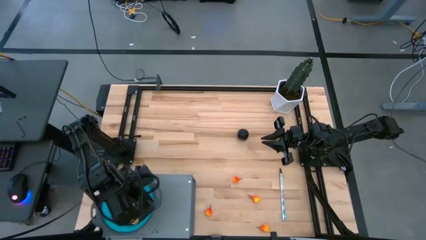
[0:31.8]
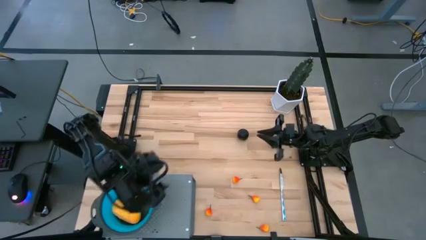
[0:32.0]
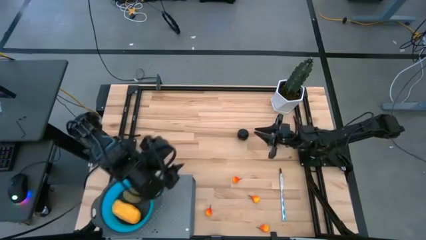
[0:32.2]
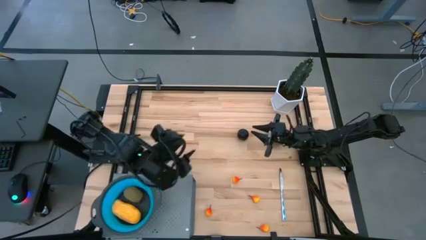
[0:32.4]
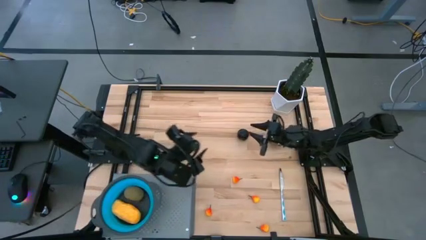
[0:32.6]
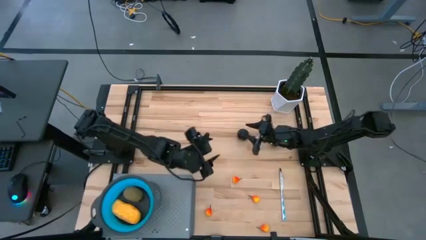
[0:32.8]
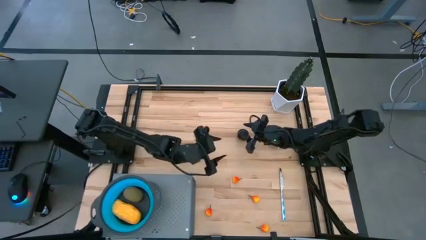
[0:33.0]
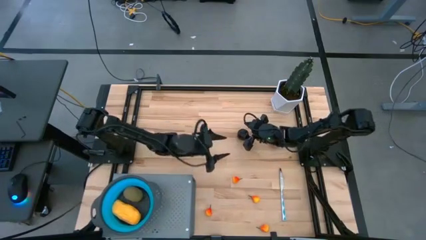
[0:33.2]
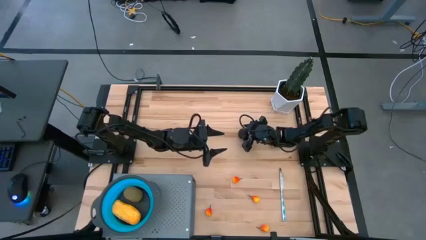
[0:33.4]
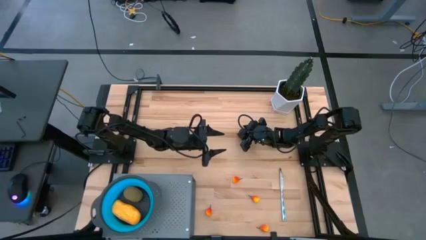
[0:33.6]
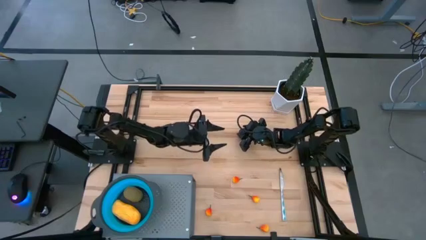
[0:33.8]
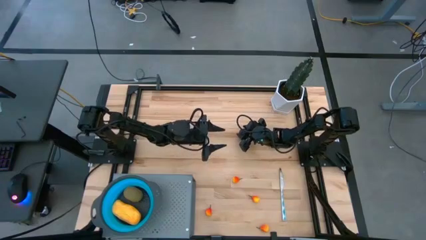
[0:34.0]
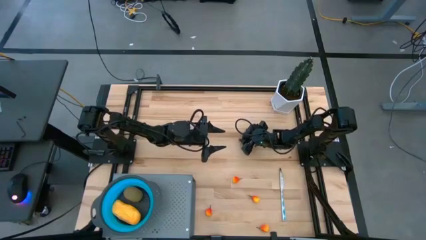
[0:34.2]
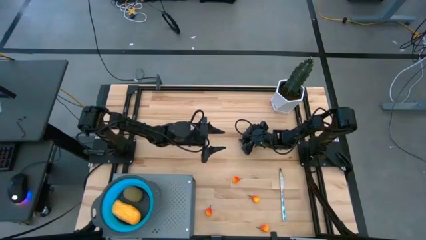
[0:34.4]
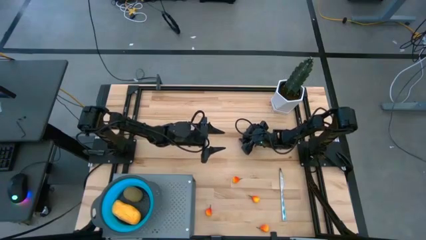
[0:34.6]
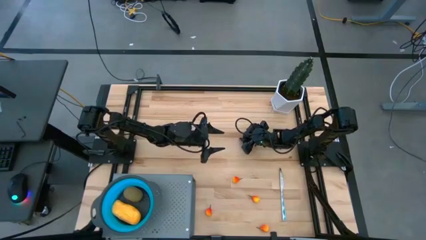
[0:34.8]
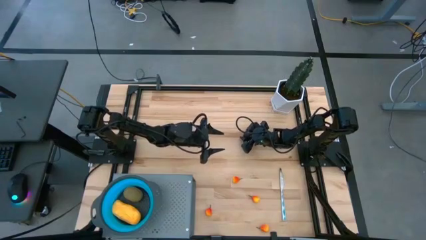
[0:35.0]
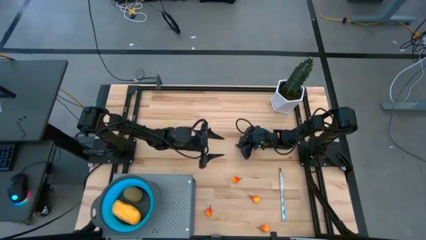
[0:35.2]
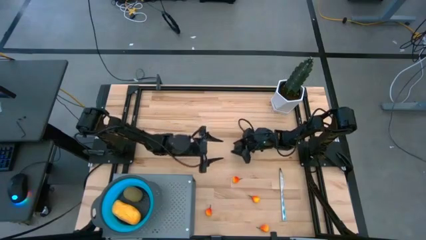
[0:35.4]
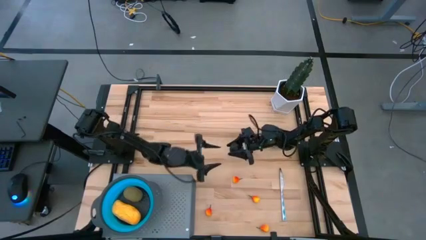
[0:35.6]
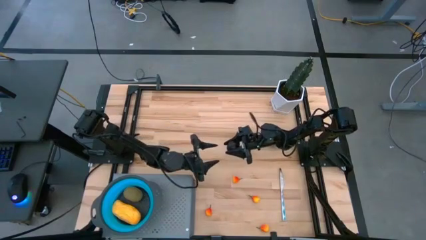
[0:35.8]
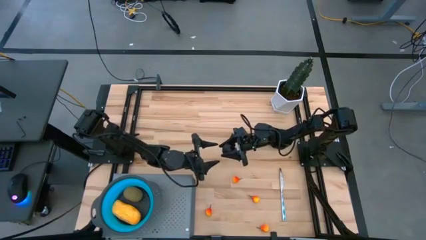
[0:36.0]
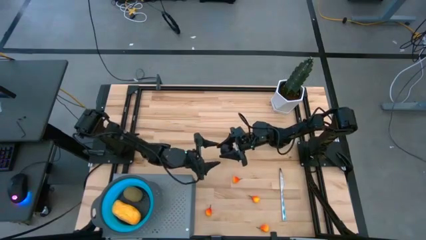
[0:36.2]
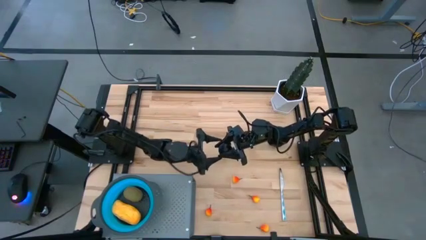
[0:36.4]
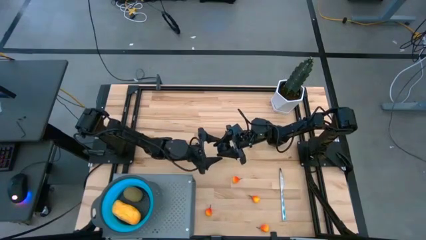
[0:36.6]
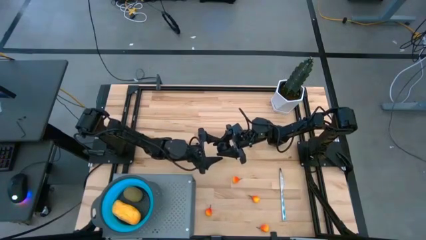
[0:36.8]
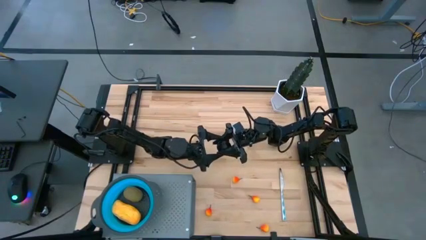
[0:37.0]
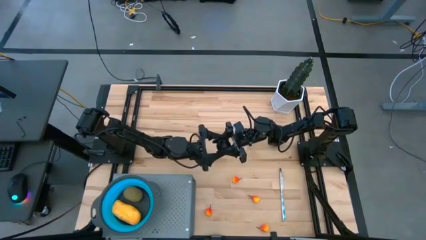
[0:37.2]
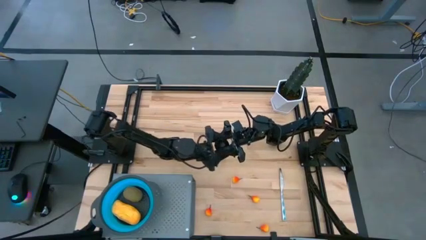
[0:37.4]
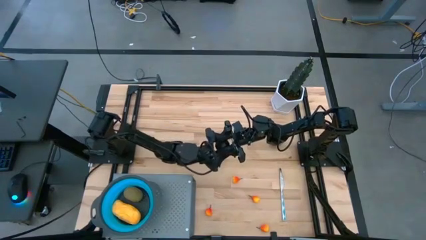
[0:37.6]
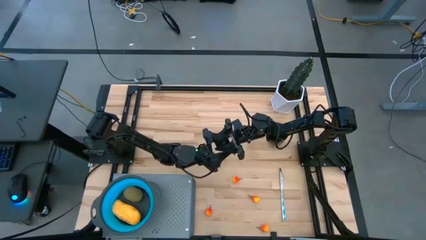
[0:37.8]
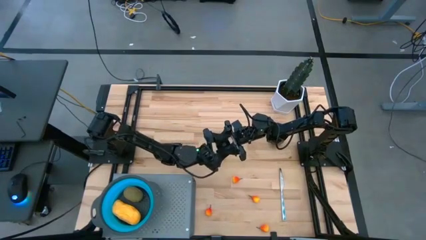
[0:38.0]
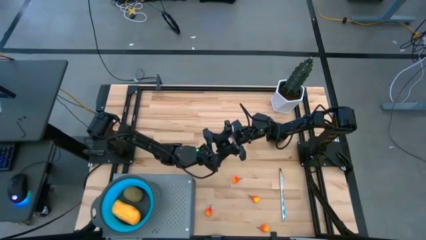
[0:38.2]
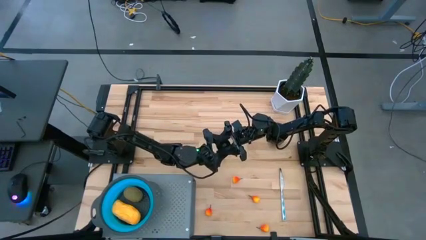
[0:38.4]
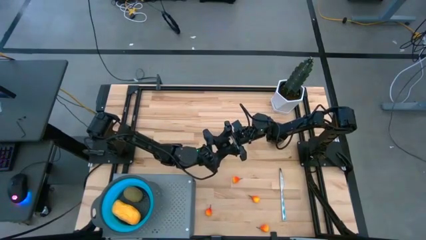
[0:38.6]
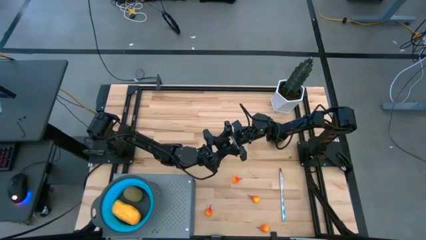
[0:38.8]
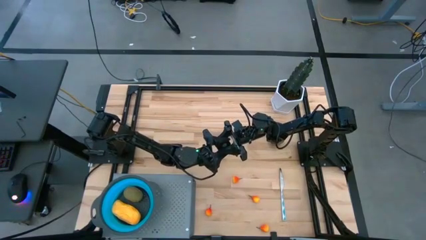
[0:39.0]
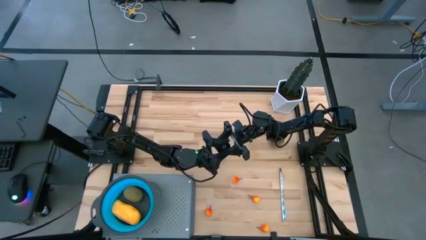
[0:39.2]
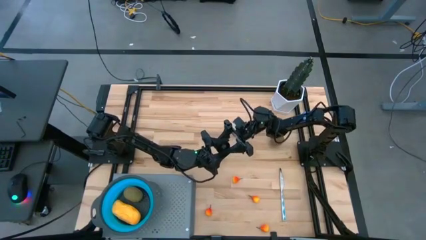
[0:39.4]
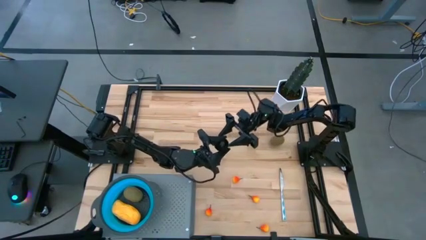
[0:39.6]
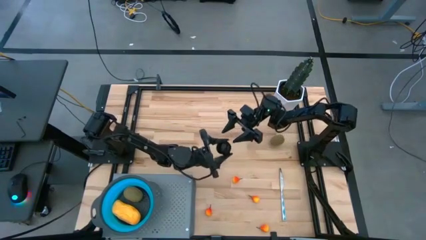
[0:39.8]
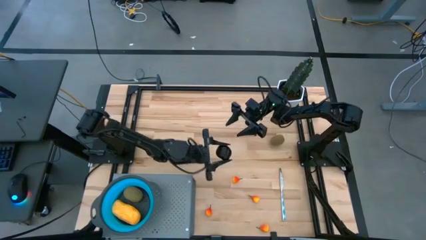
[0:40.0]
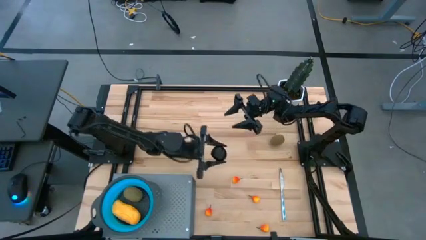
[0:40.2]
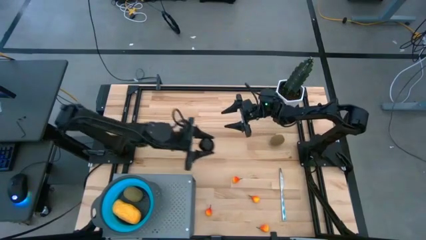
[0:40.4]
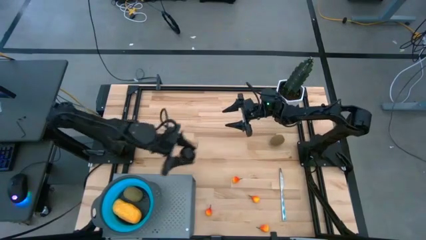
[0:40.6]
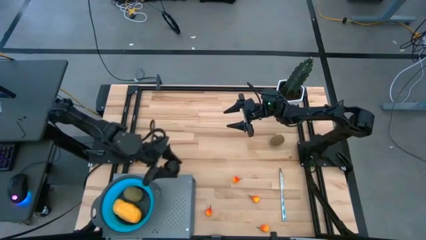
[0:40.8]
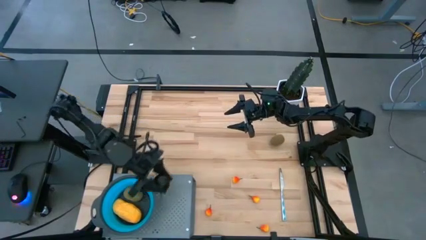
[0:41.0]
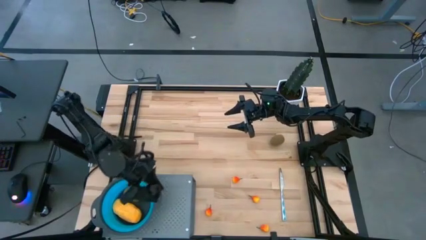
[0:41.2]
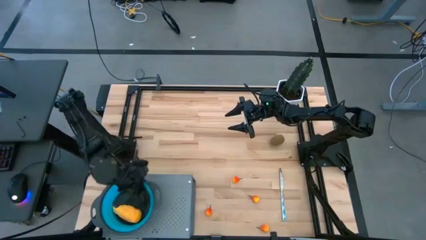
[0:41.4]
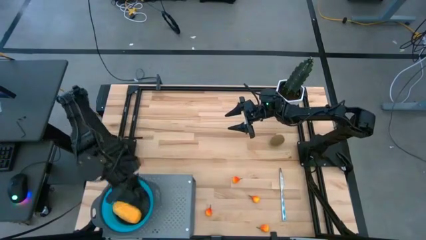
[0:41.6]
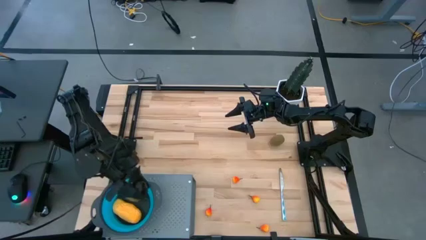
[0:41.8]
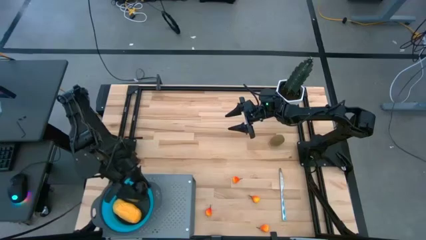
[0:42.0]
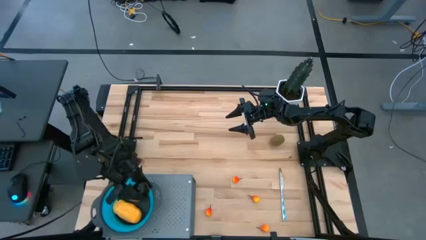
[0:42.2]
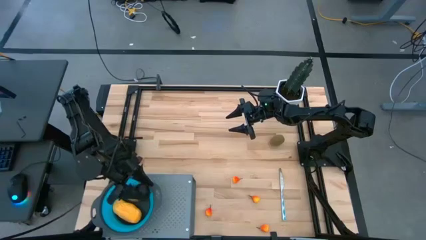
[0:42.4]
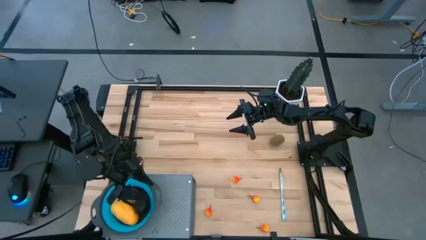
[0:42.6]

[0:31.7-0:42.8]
Task: Pick & Place Fruit
Put the plum into the strainer bowl
